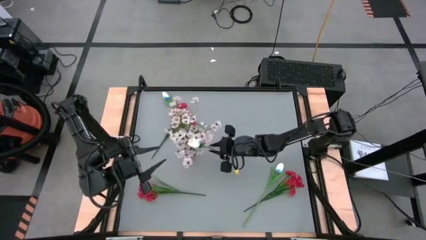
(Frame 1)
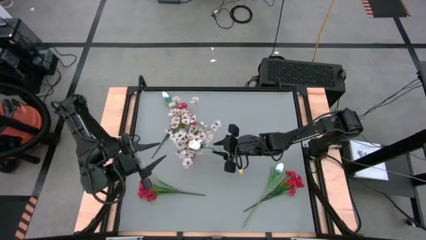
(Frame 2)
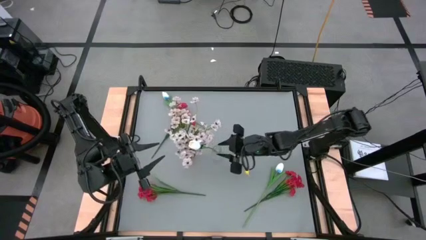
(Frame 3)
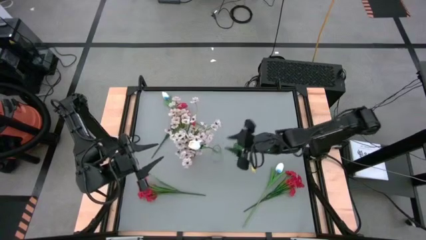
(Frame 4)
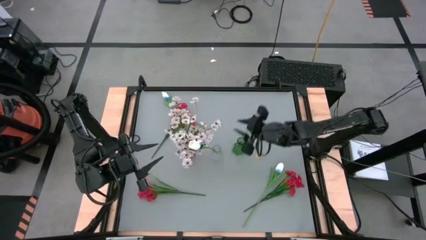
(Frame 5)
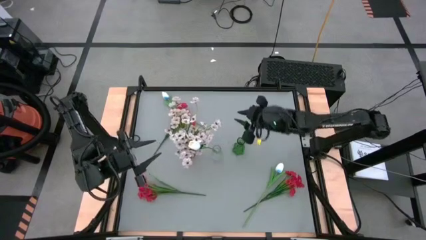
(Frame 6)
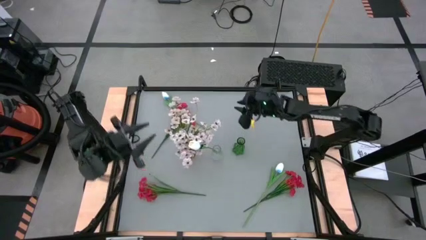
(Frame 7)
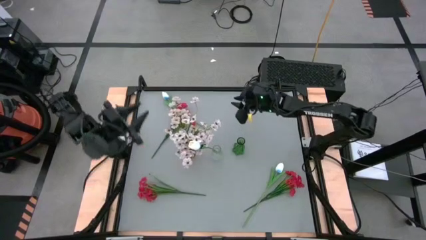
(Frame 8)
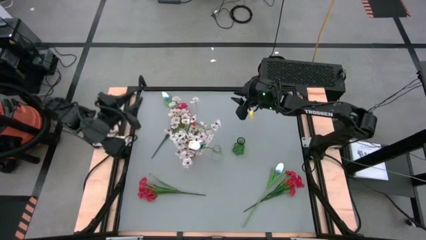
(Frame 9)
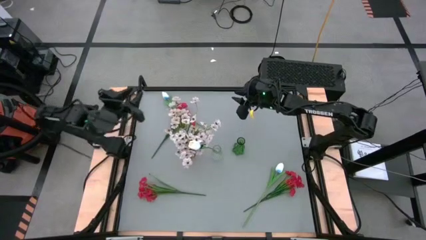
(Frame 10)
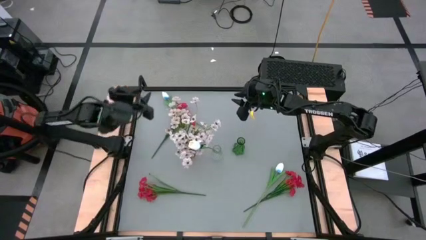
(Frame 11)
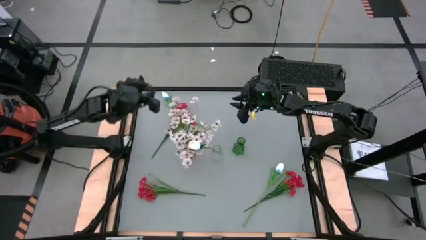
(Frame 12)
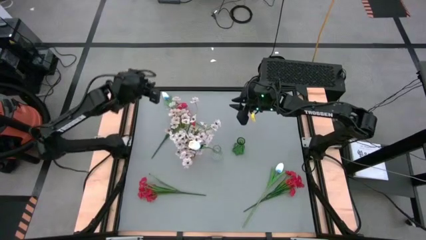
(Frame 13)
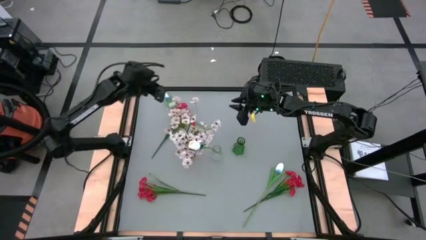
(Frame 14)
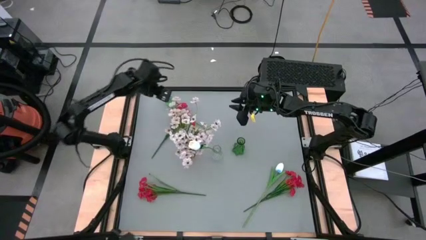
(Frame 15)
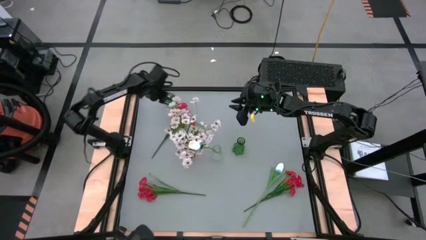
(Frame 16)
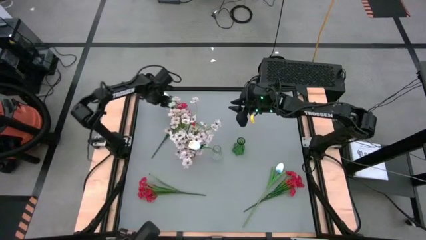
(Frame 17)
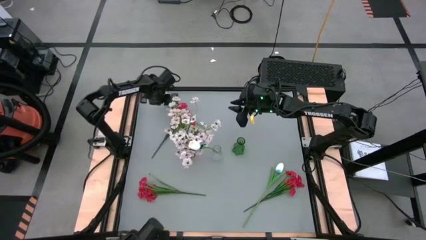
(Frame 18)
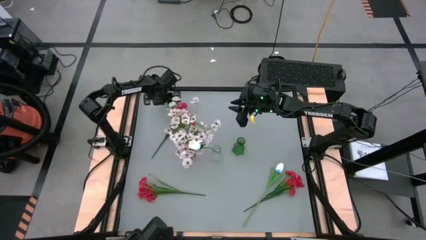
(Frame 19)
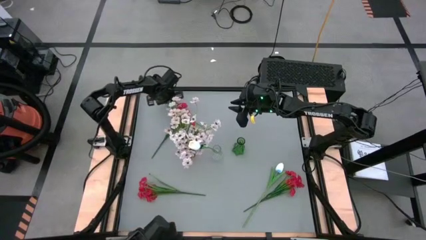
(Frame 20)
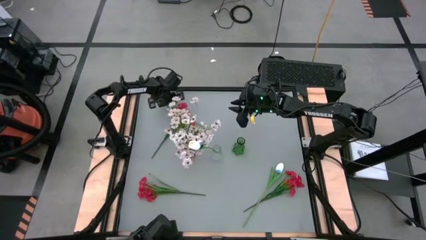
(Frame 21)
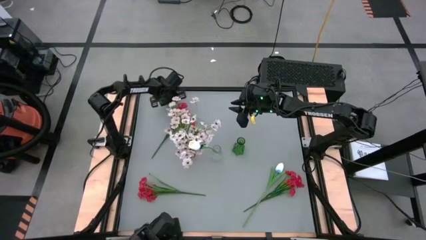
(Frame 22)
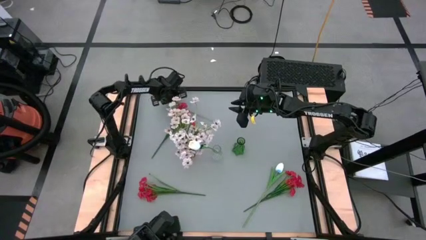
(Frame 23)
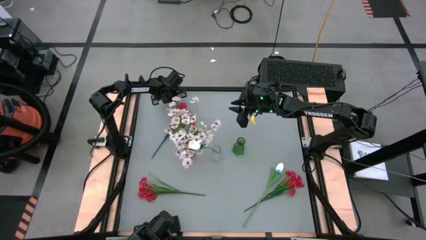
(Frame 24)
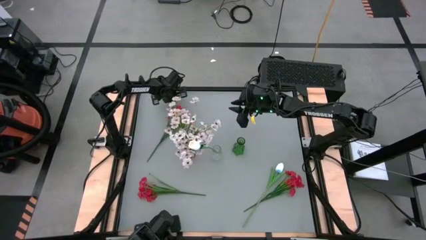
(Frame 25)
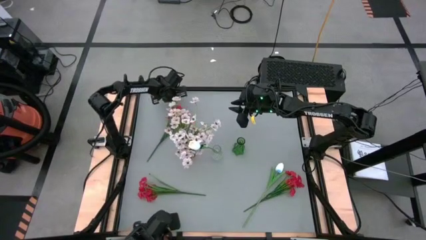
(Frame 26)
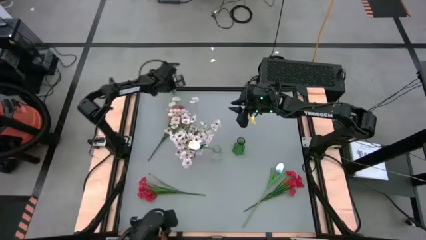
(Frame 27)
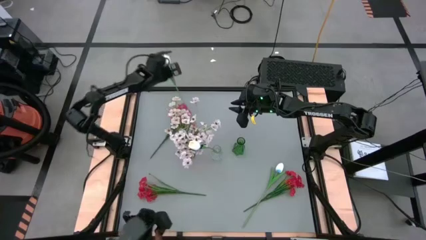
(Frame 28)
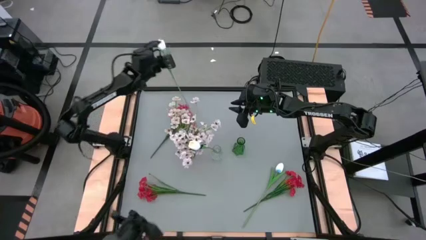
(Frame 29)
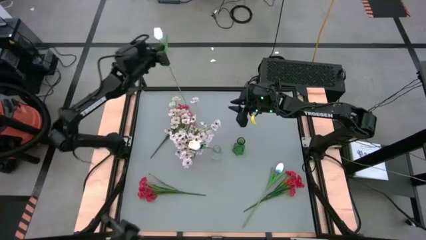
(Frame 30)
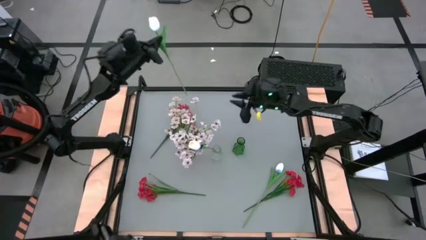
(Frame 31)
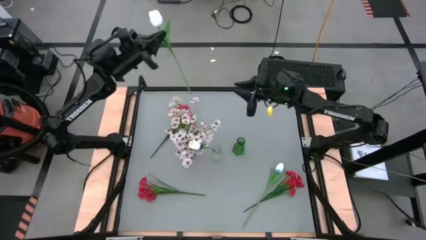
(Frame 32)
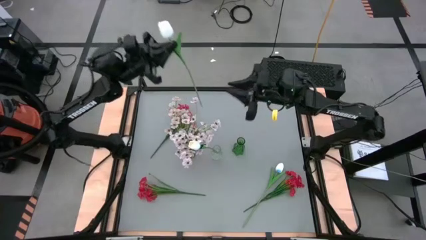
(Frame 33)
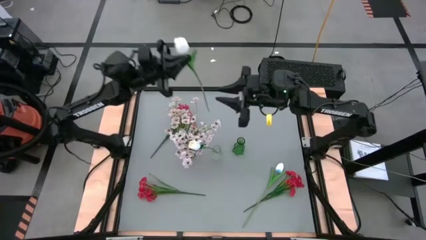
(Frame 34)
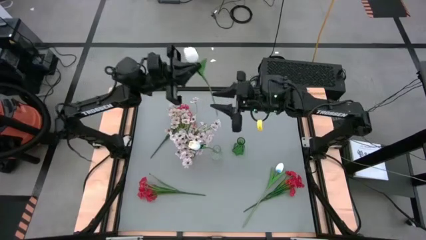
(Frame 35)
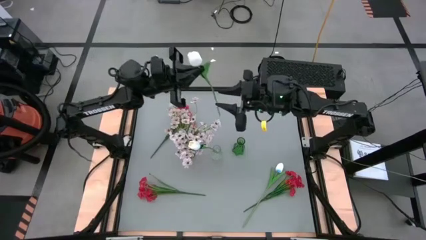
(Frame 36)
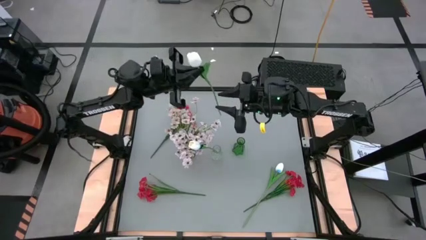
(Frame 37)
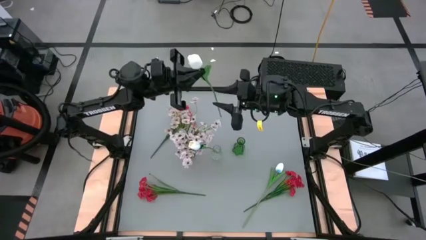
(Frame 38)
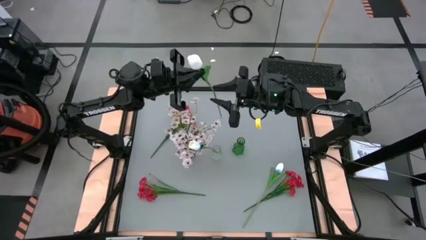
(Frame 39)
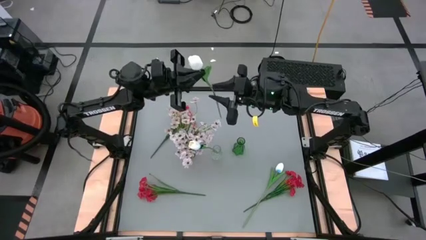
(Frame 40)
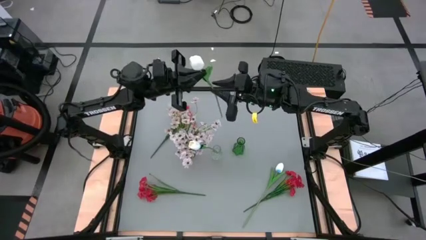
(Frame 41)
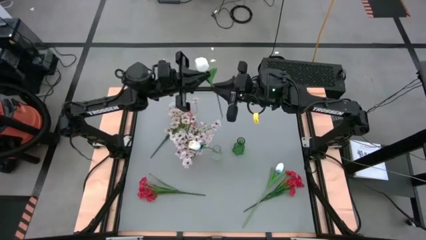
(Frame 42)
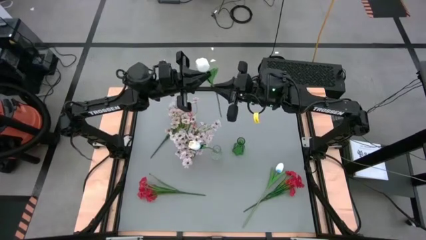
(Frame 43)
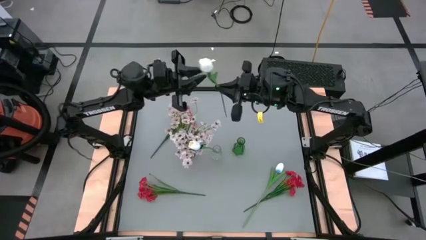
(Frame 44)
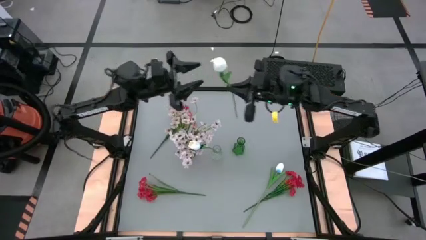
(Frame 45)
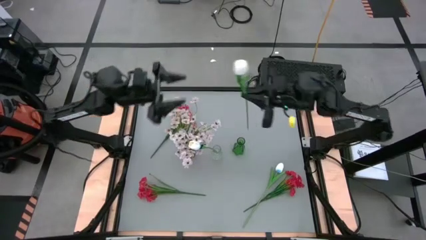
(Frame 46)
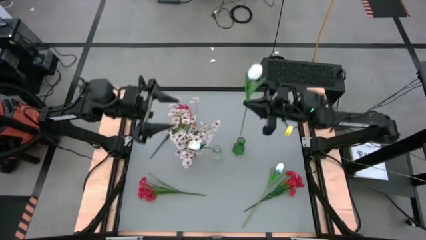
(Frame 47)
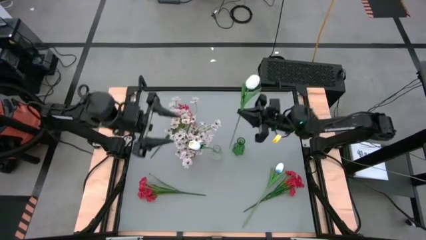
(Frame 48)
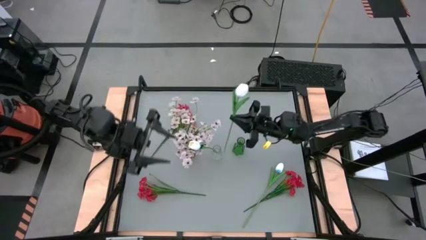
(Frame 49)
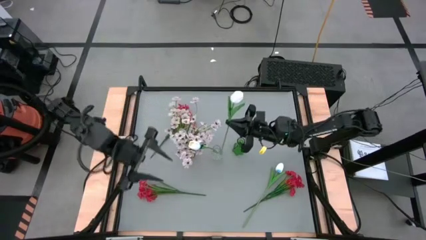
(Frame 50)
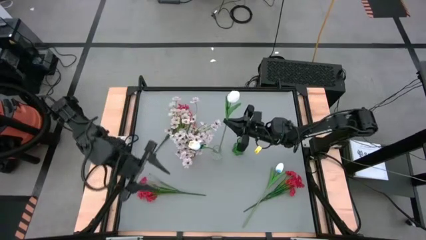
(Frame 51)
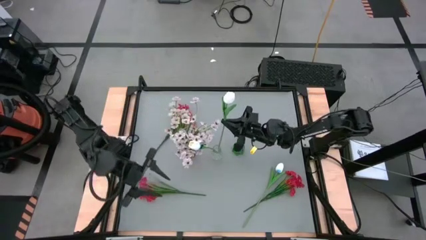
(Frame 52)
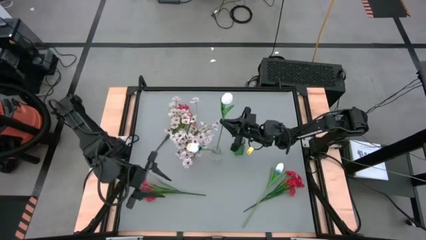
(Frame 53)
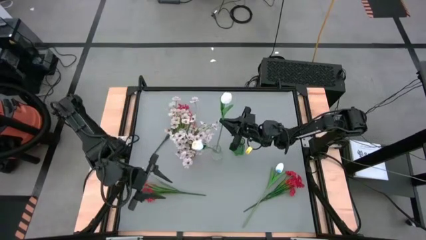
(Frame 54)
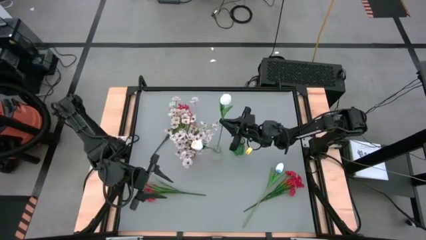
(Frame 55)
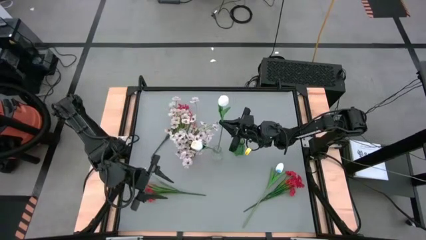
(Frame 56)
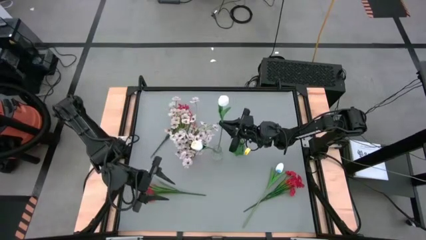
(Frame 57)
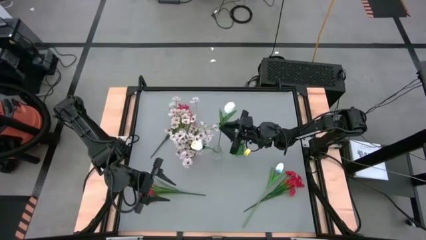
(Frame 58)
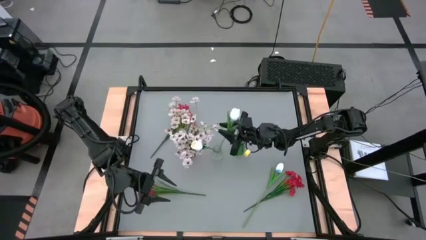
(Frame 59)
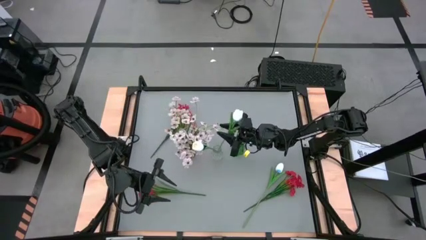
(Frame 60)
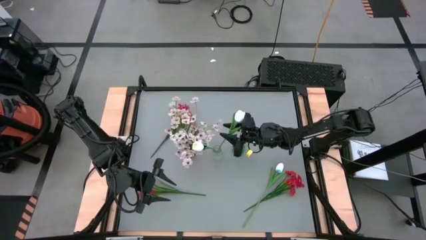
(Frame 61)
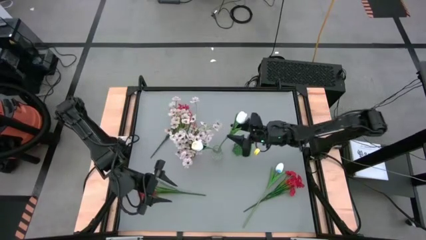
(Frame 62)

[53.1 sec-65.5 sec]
Task: Sort flowers into vase by color
Put the top white tulip into the transparent flower vase

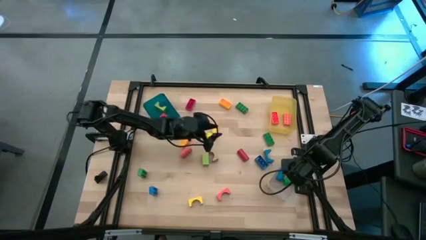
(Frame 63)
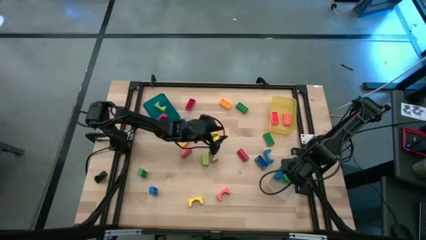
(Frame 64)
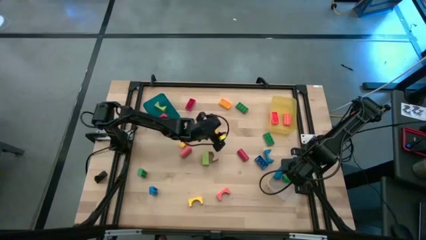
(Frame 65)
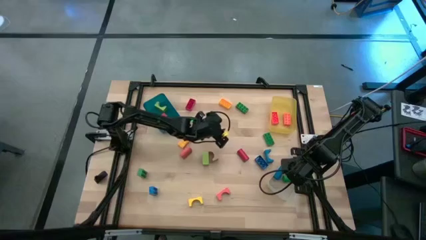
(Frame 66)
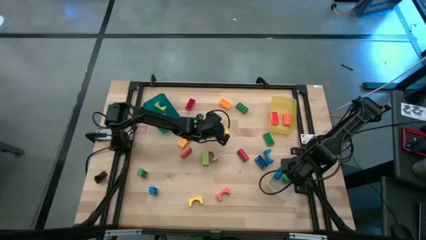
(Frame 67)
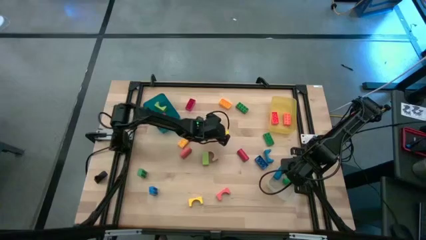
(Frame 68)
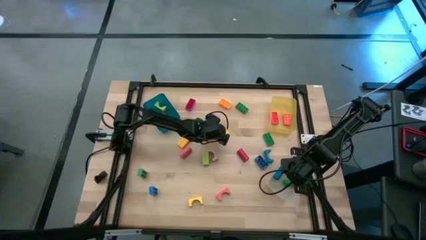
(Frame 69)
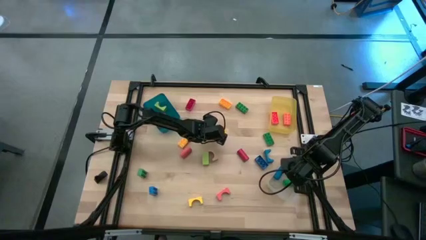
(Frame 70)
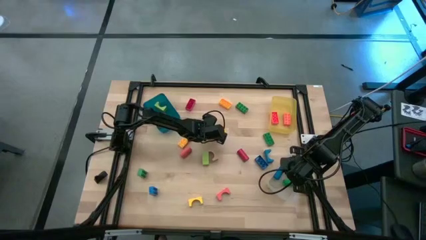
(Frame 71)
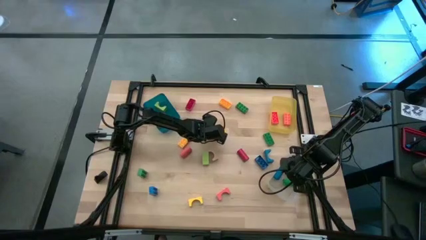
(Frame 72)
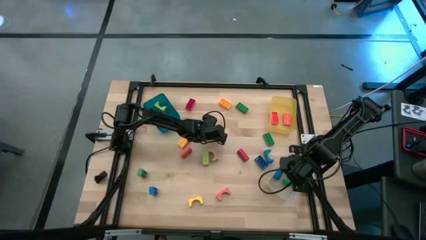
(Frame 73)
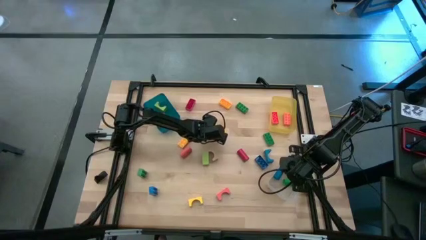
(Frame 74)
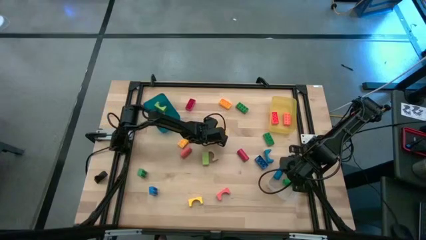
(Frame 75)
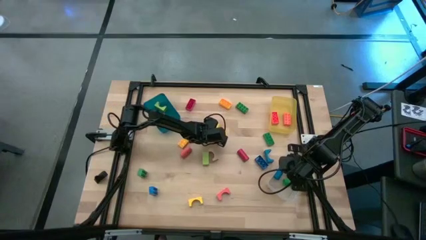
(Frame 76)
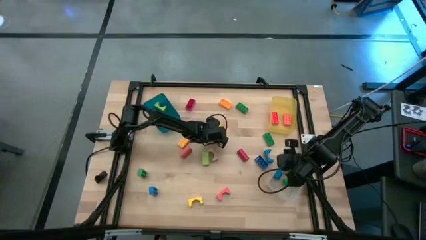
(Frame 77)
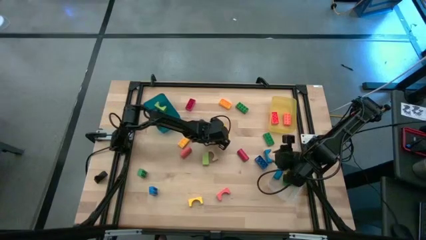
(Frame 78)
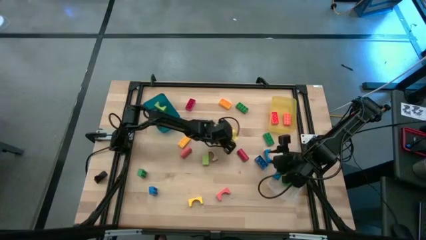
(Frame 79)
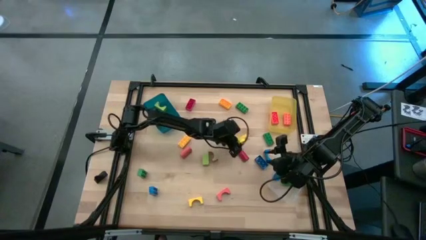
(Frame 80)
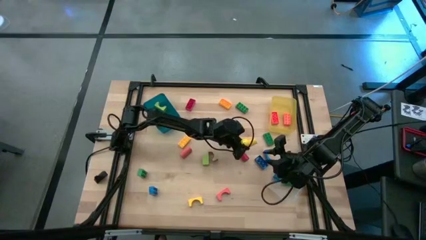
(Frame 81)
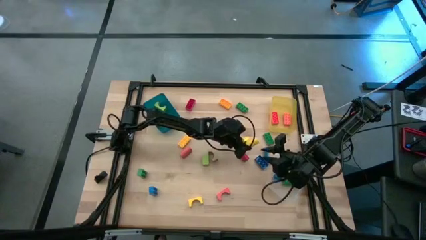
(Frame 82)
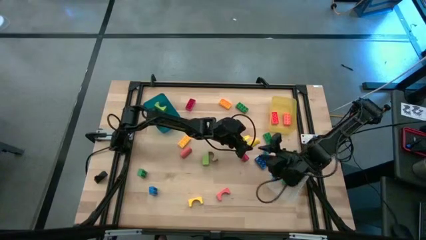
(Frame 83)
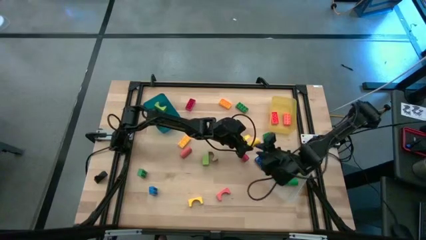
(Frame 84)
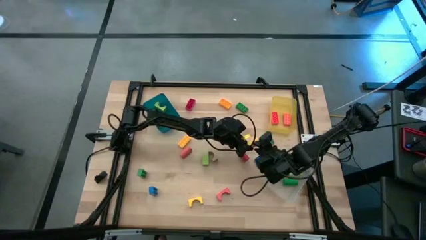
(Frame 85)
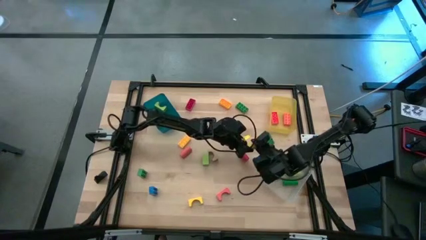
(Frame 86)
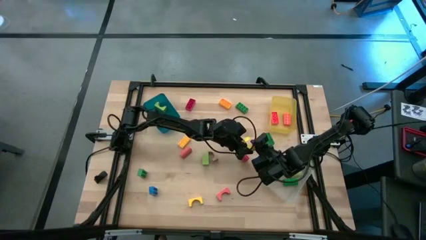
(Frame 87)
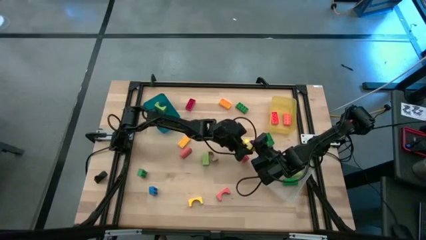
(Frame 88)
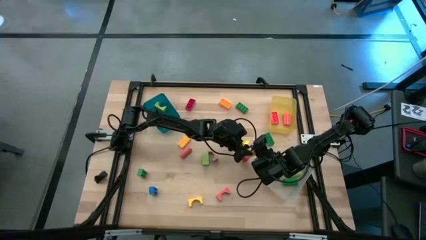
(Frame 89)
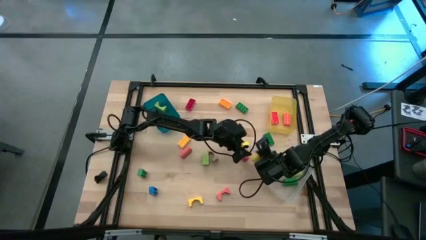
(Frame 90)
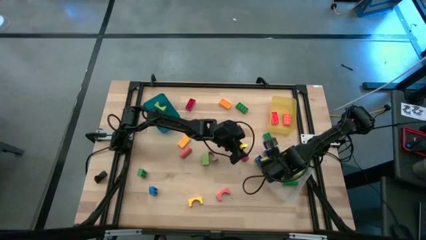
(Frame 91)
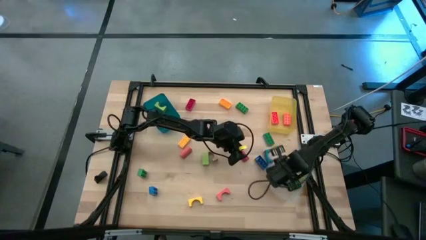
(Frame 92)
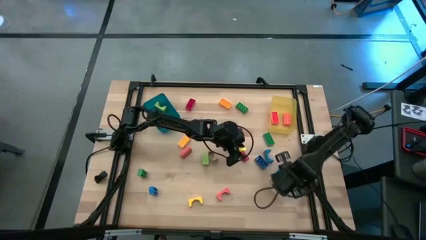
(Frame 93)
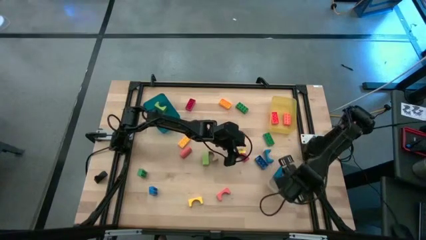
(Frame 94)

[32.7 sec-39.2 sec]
Task: Sort blocks by size
Put the yellow cylindrical block into the transparent bin
